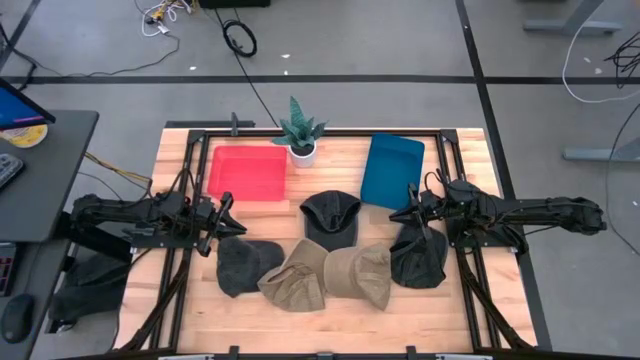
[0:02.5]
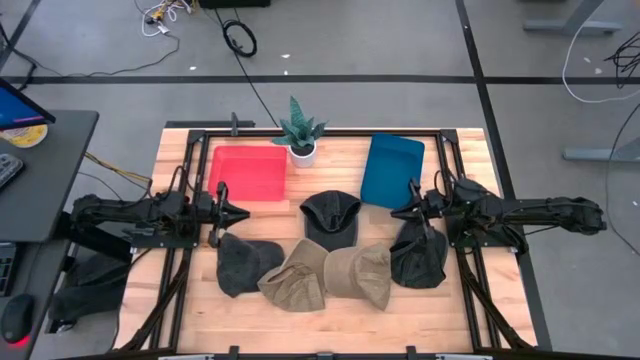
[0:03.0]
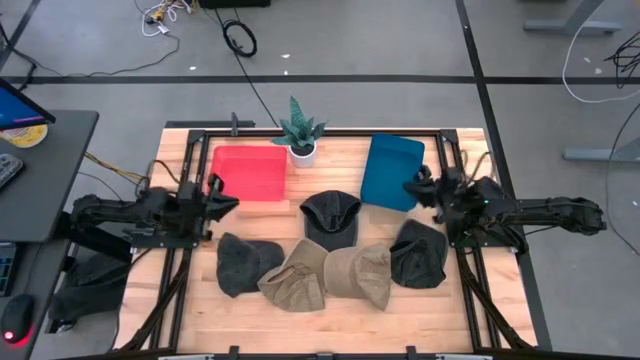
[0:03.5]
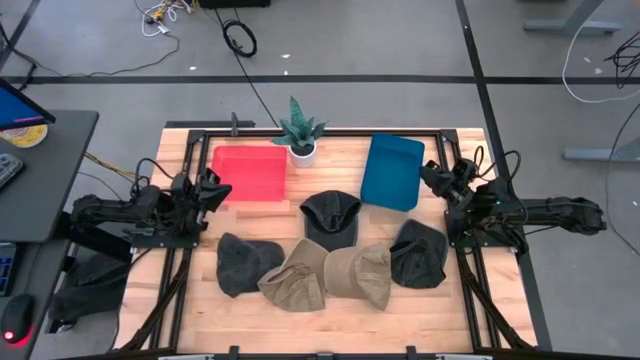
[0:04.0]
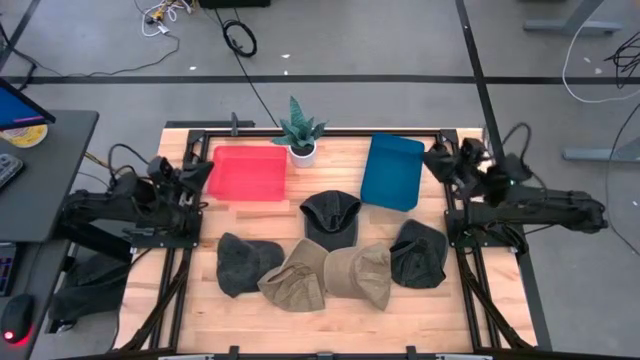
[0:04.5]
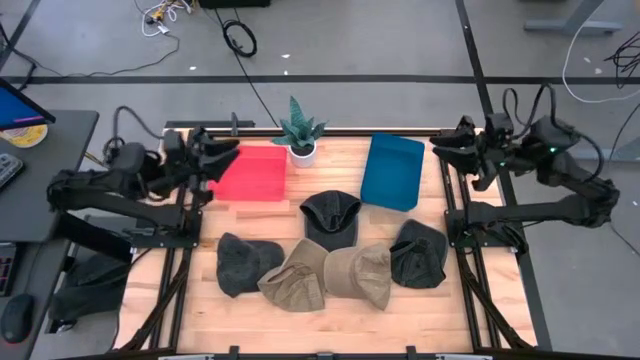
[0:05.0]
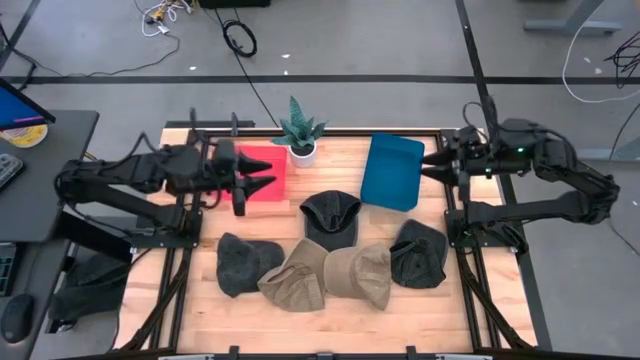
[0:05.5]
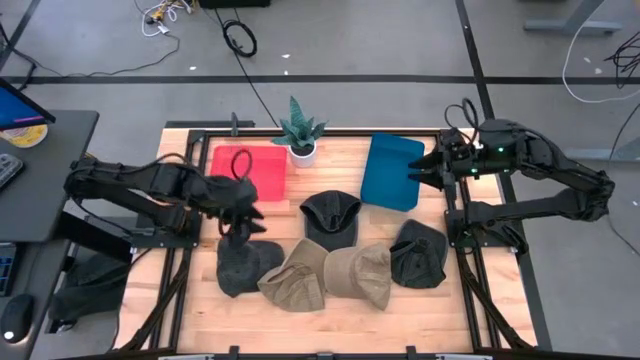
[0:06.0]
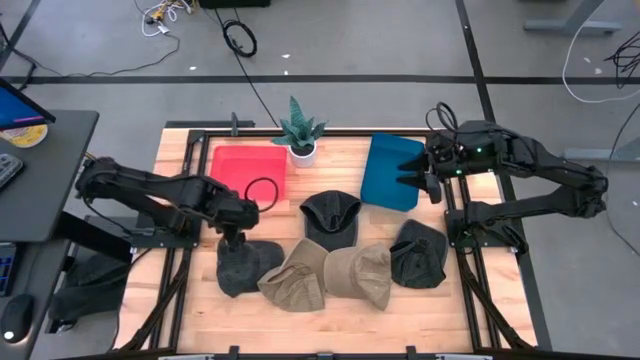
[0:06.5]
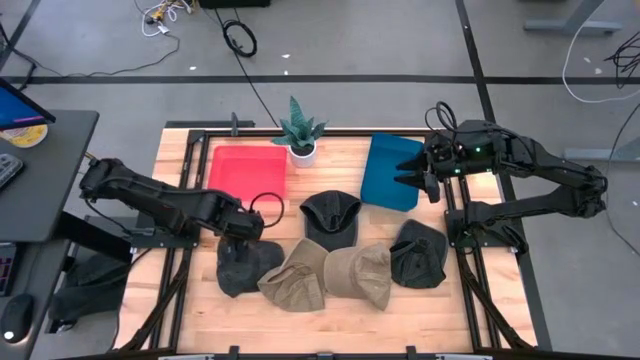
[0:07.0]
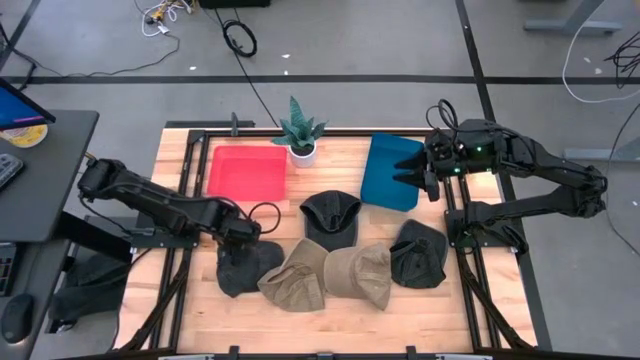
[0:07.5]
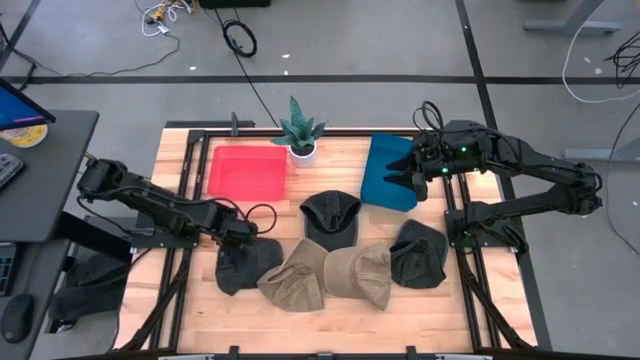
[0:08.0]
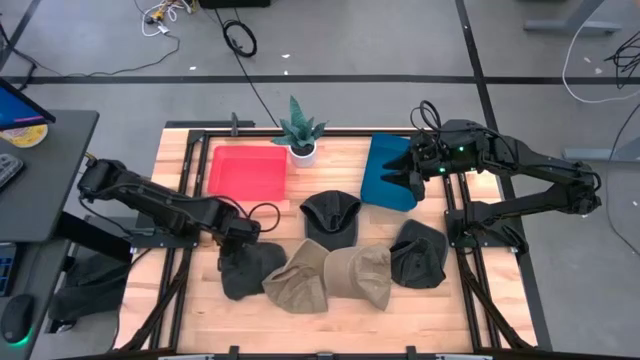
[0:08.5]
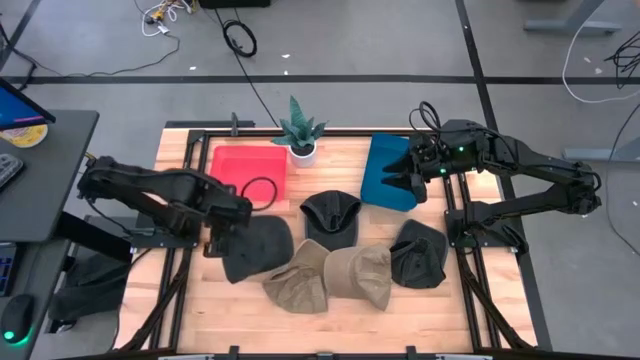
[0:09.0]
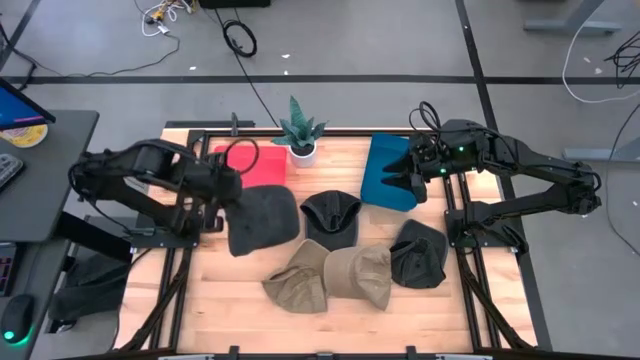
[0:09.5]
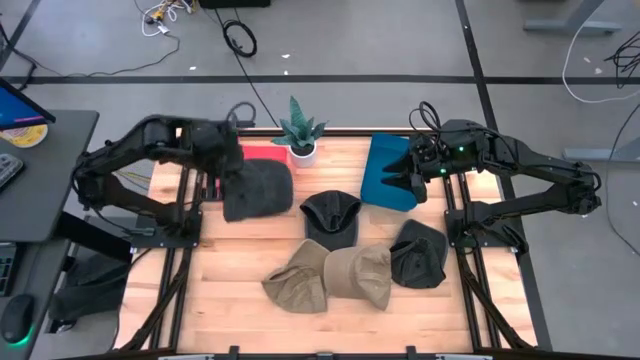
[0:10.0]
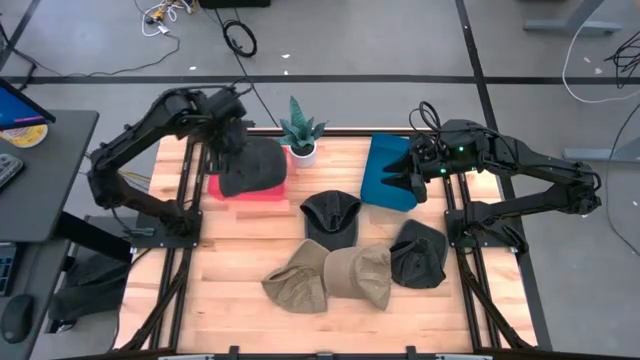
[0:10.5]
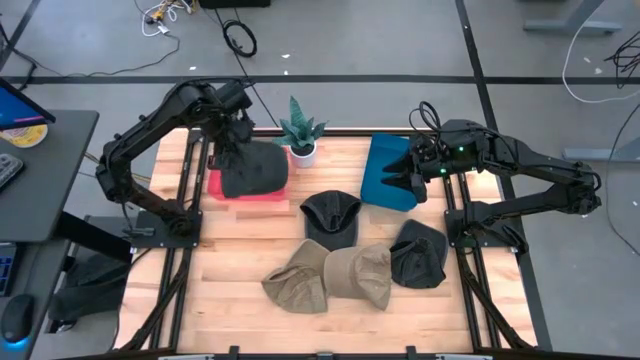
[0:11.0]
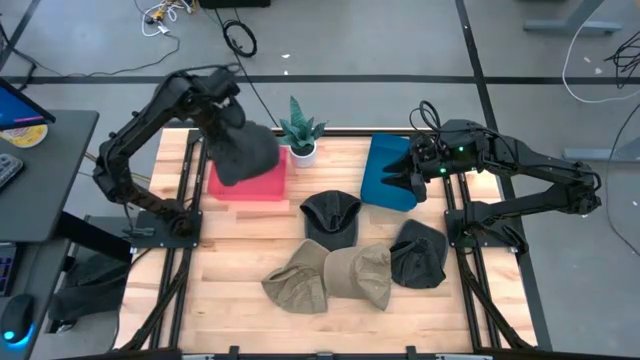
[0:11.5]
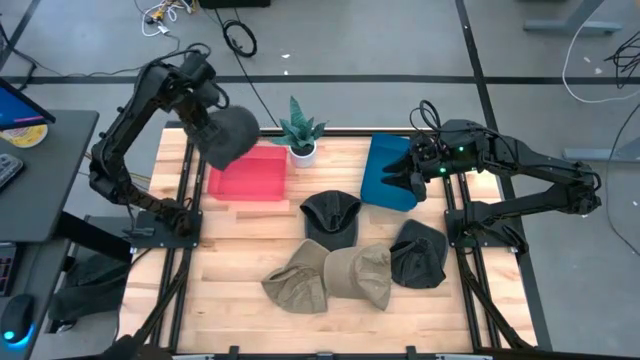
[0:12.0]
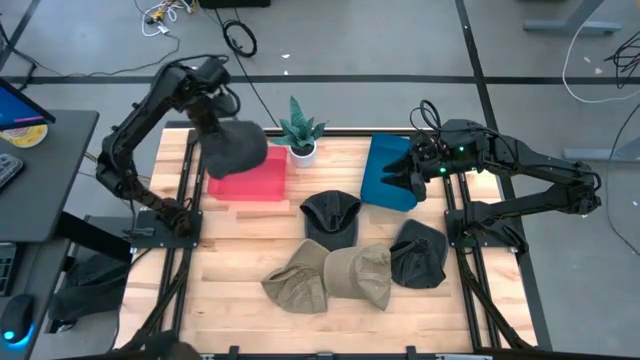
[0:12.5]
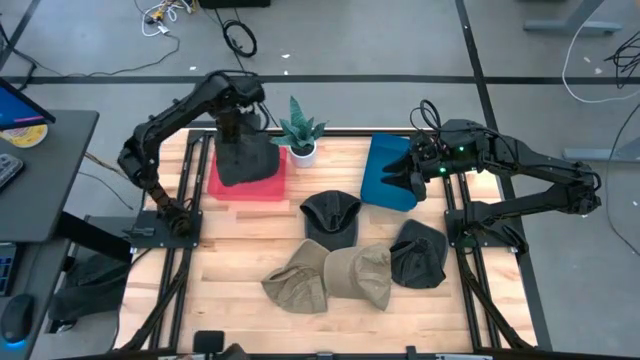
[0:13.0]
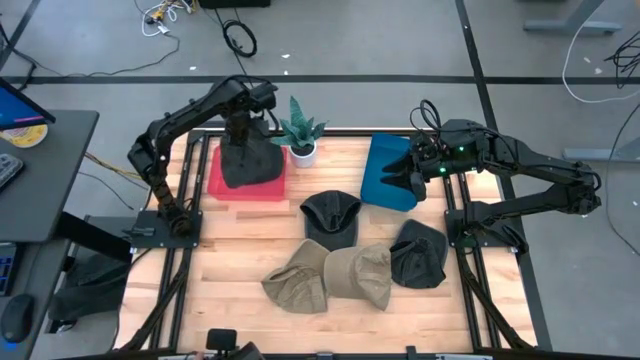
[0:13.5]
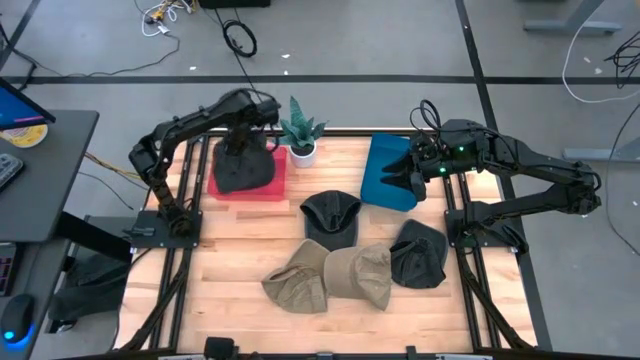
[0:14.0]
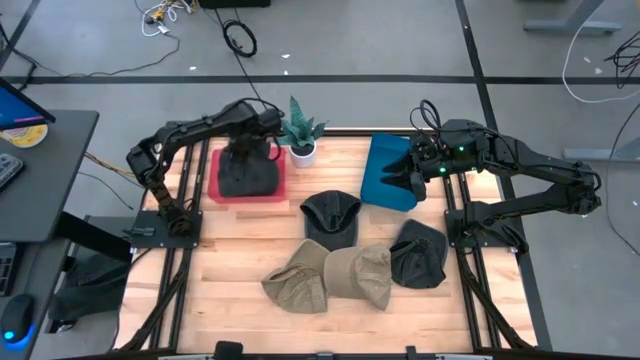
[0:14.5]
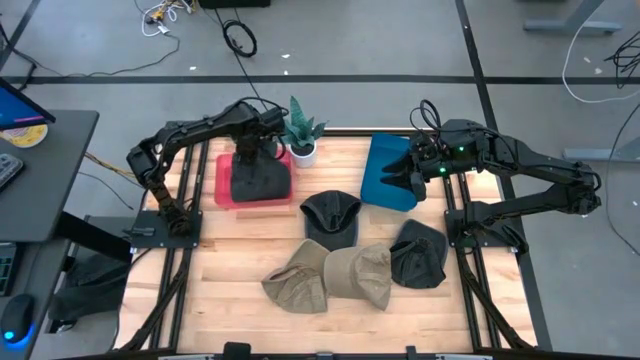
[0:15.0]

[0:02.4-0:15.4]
Task: Pick & Place hat
Put the left black cap into the red bin
